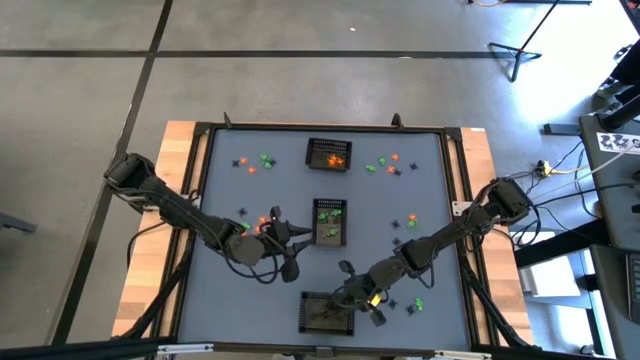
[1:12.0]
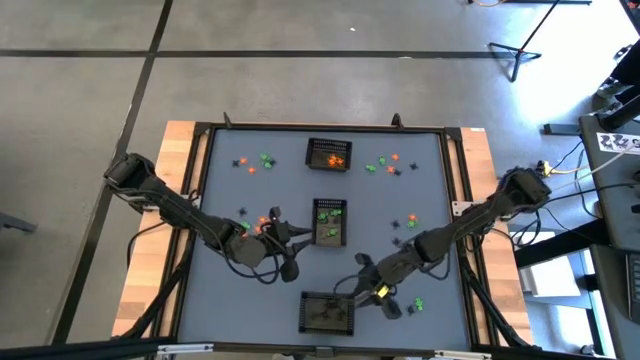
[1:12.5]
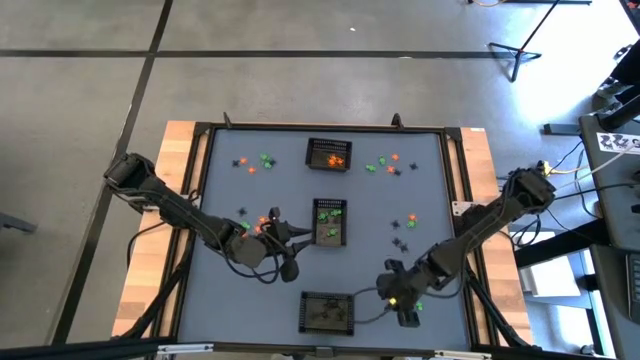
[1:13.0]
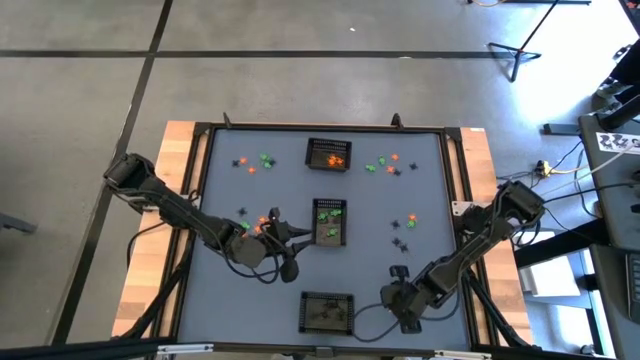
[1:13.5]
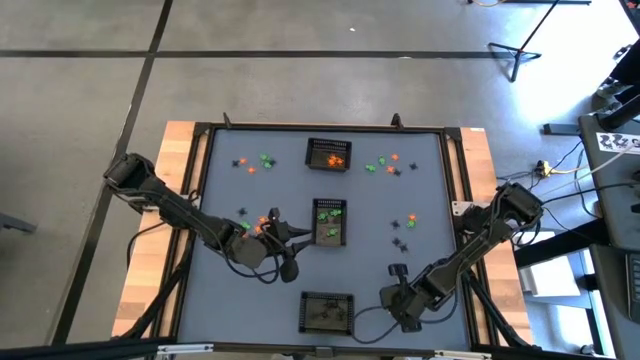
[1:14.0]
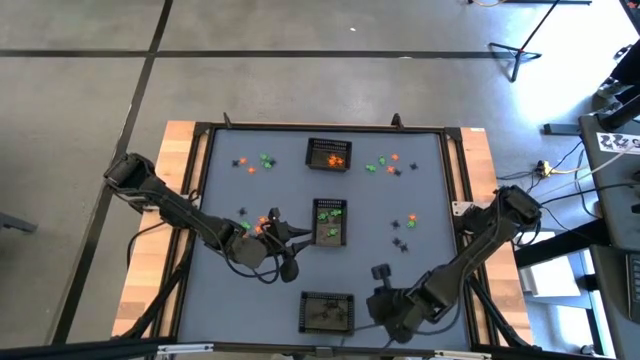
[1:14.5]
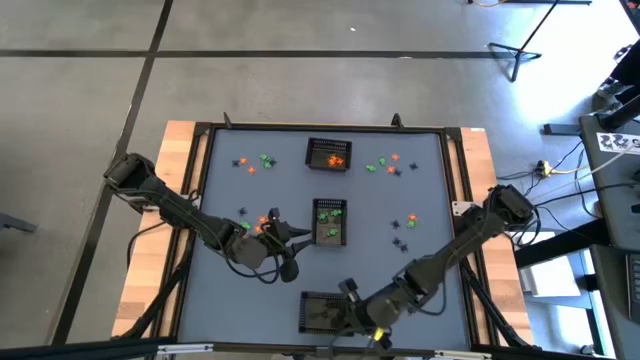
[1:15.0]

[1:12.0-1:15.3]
Task: Sort Halloween decoration
Put the black spider toy into the bottom black bin

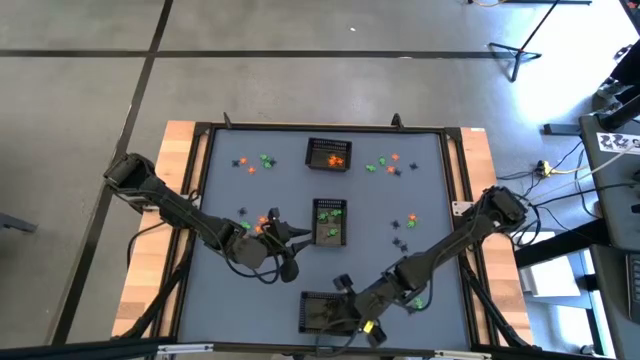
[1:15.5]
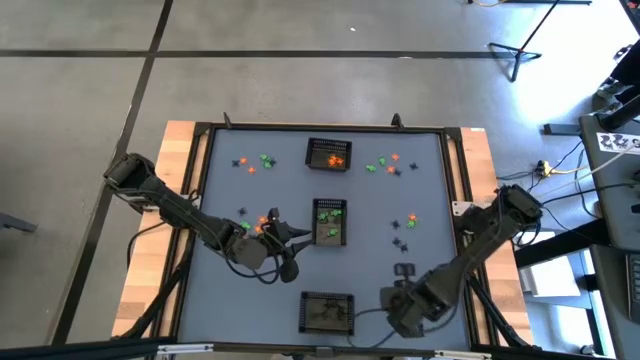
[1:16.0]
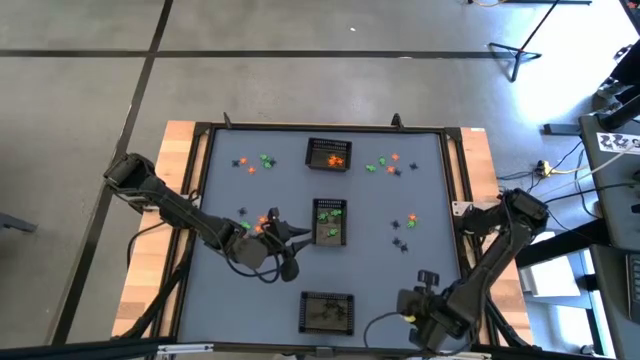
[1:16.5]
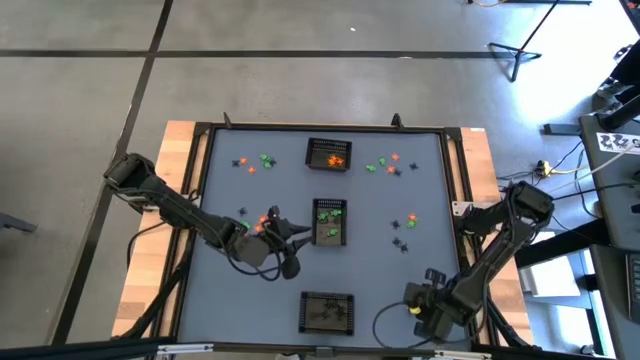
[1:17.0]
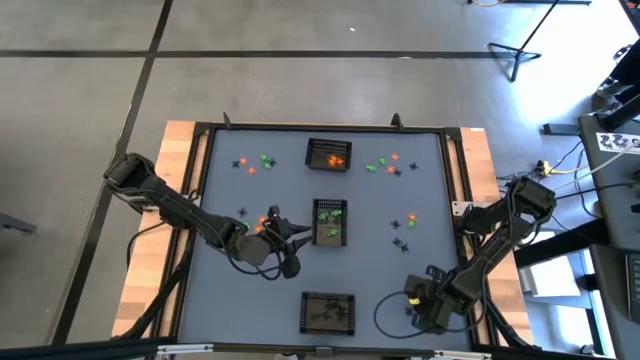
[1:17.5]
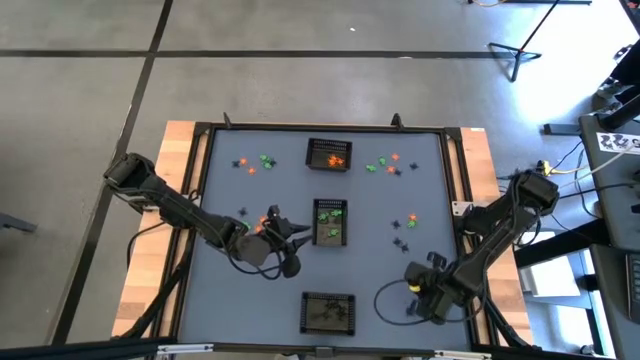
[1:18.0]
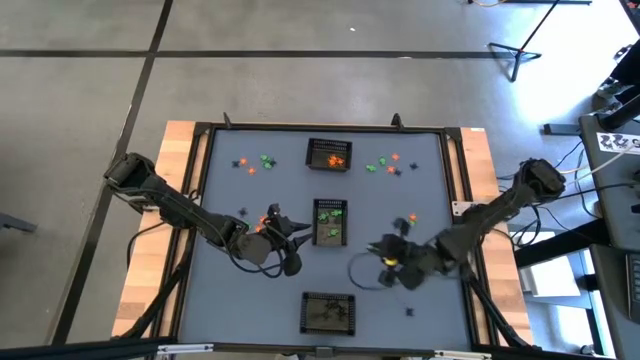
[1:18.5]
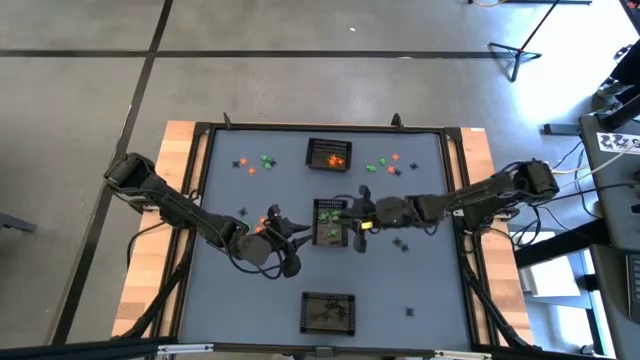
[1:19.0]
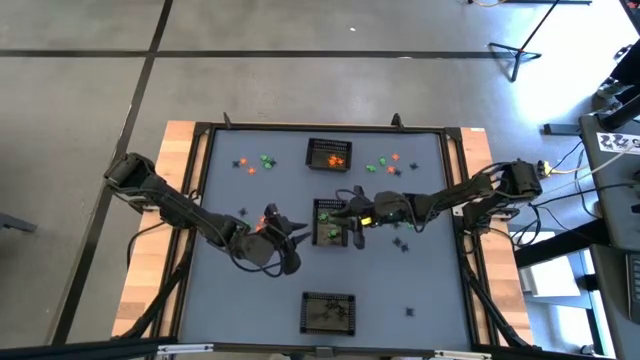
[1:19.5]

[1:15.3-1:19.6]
Put the green skeleton toy into the center black bin

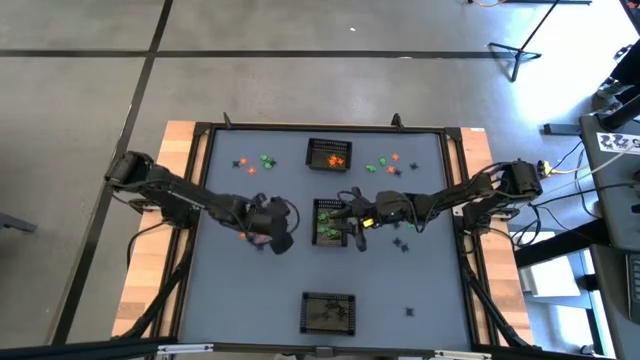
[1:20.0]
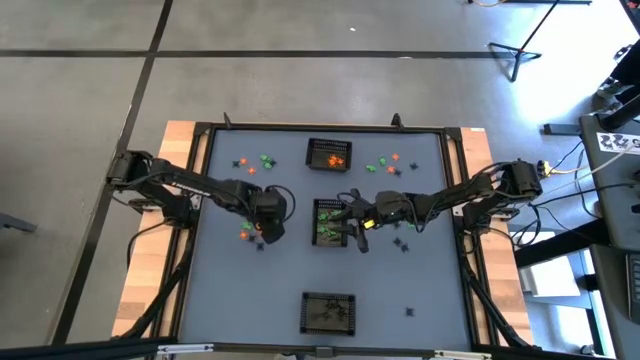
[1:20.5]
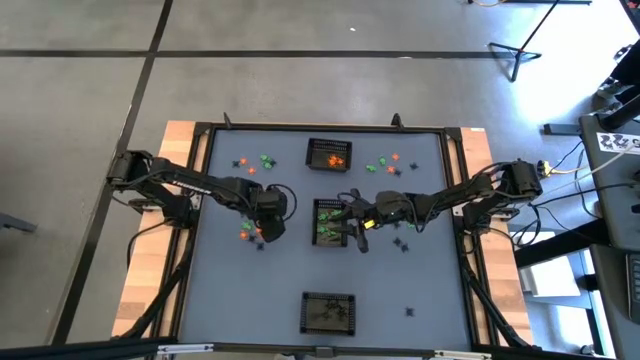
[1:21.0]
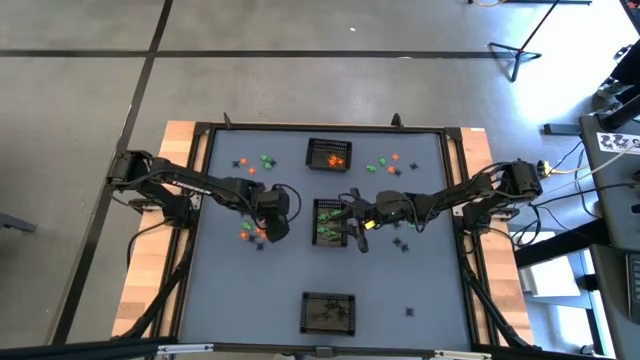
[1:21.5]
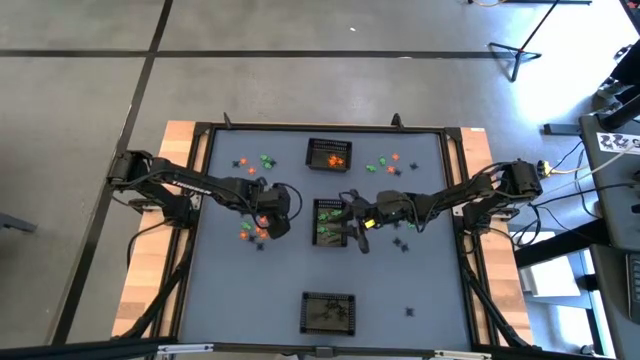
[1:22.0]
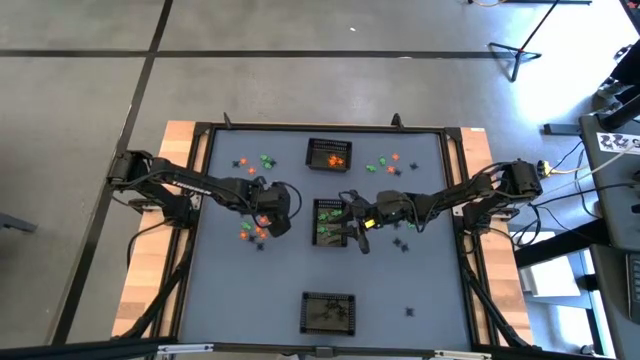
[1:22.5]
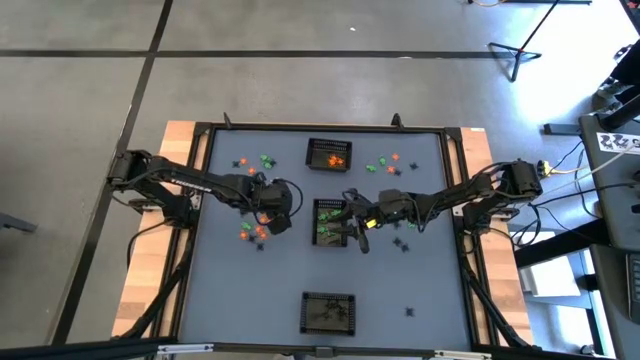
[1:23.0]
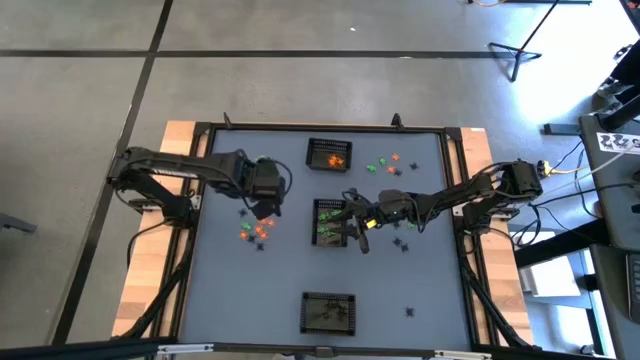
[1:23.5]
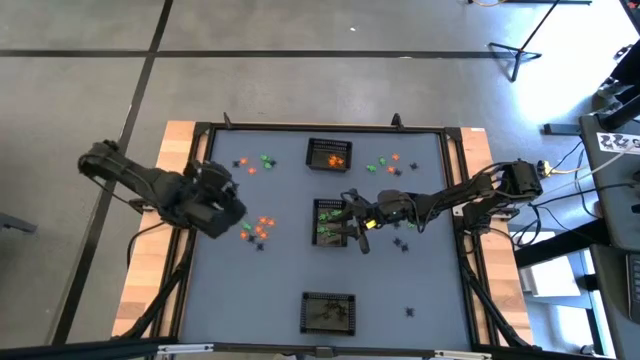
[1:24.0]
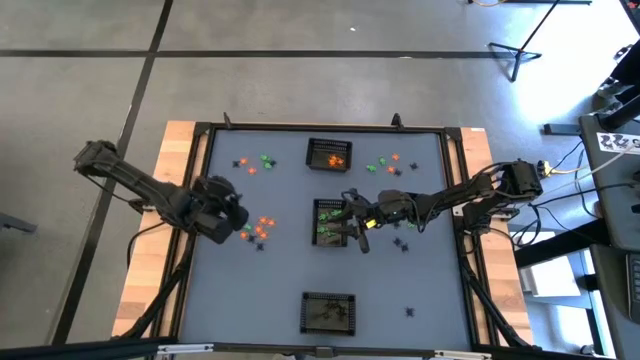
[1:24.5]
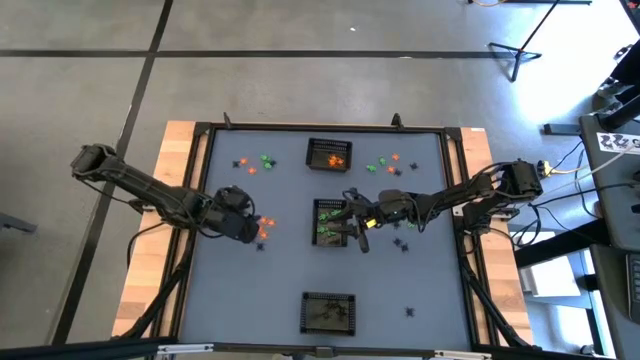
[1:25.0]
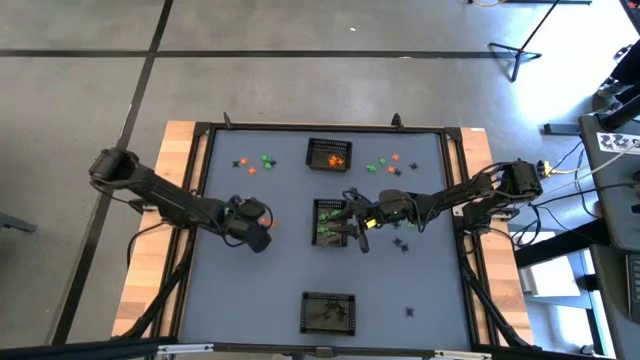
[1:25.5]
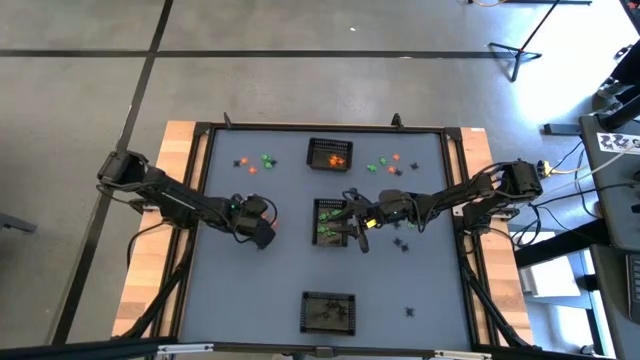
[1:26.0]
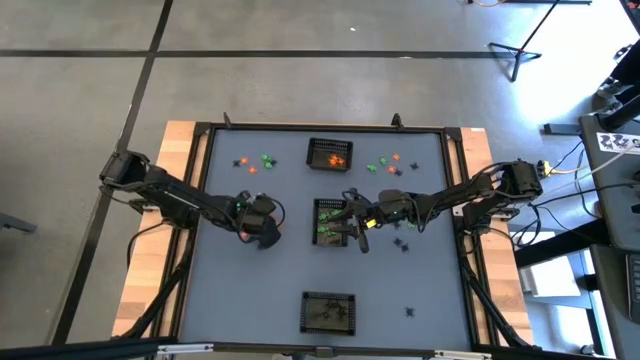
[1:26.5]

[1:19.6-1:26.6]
Put the orange spider toy into the top black bin

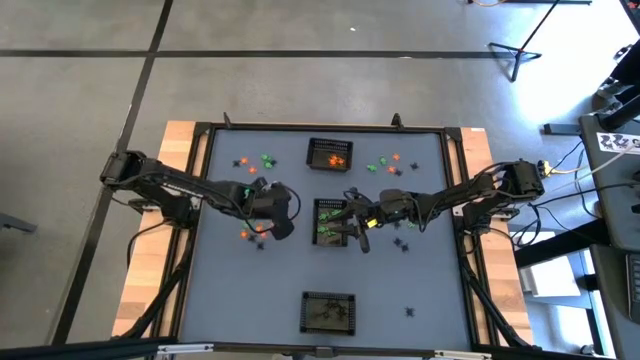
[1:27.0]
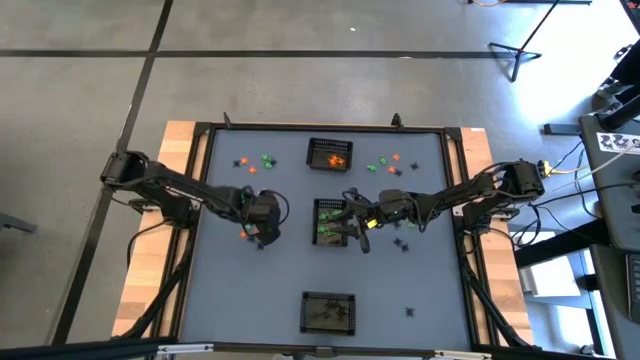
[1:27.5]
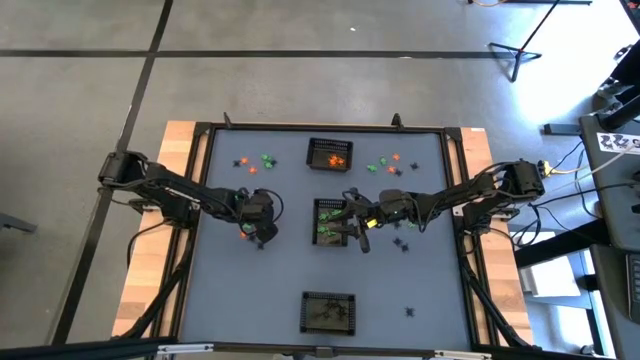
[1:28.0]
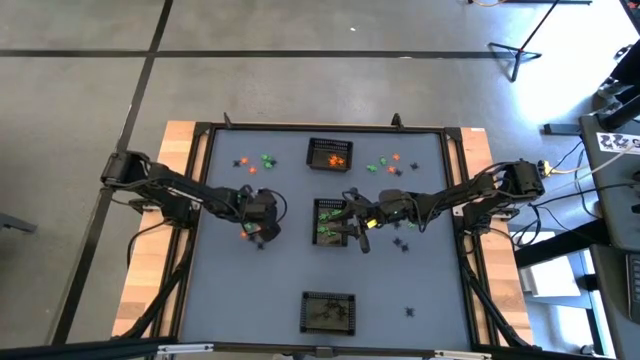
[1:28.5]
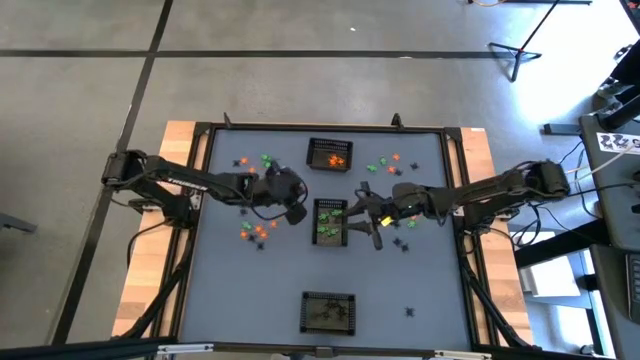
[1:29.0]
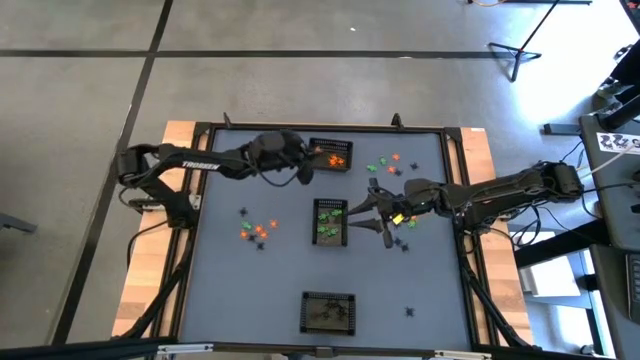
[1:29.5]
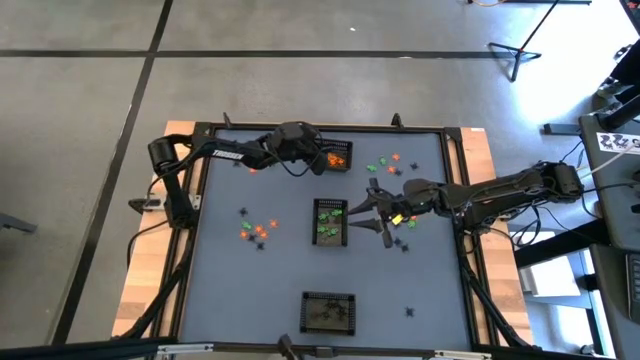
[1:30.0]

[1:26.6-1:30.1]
Put the orange spider toy into the top black bin

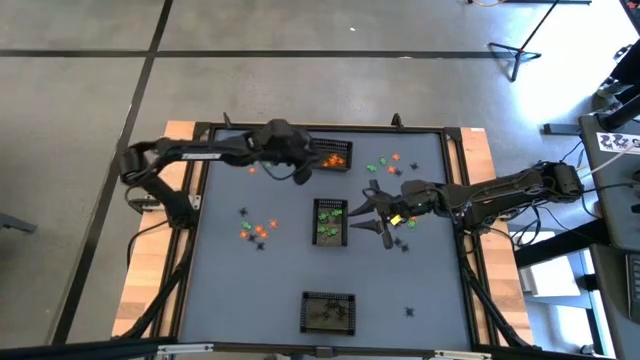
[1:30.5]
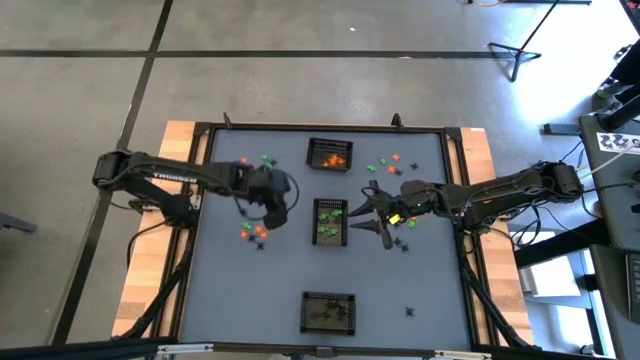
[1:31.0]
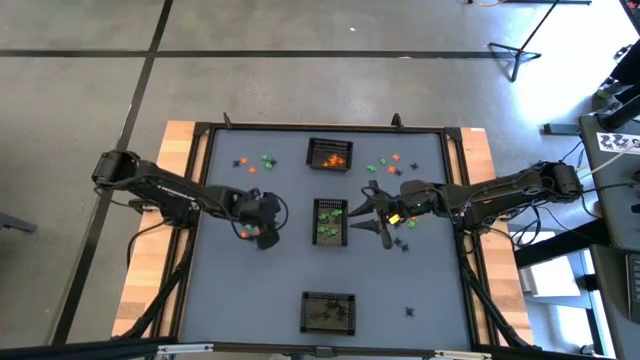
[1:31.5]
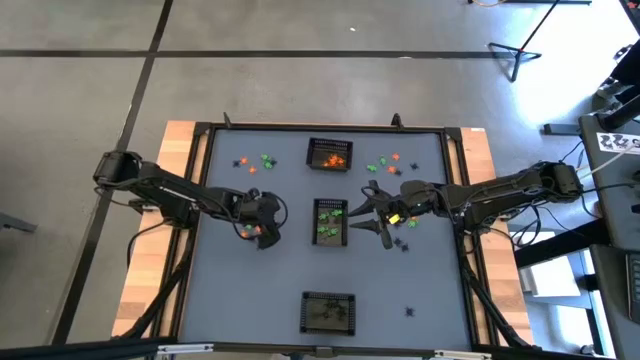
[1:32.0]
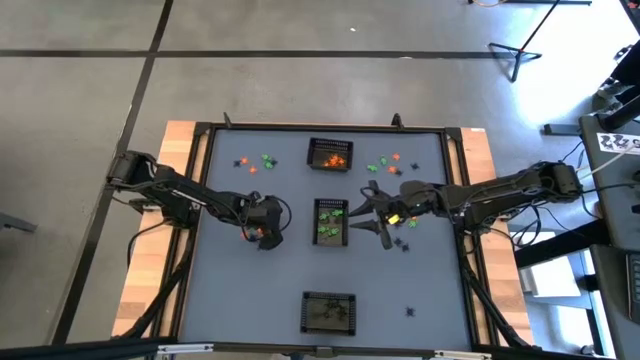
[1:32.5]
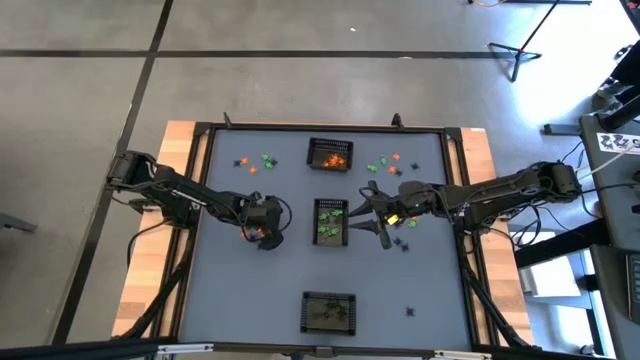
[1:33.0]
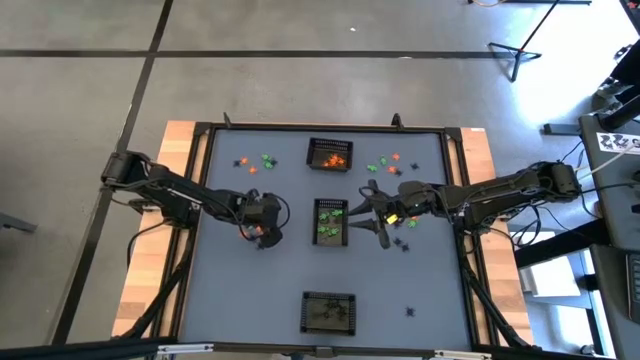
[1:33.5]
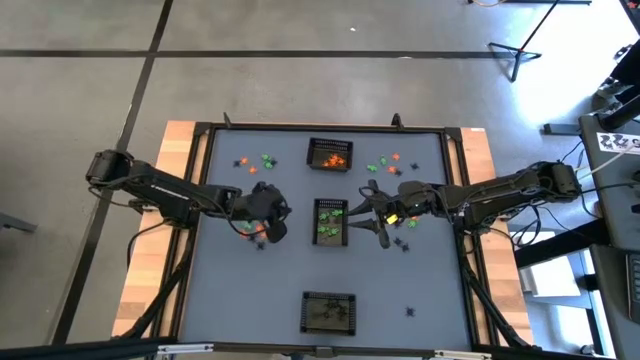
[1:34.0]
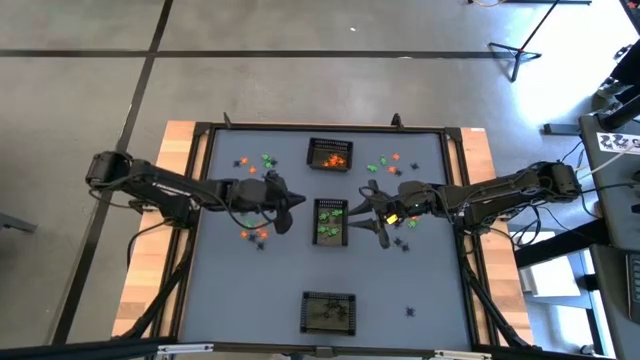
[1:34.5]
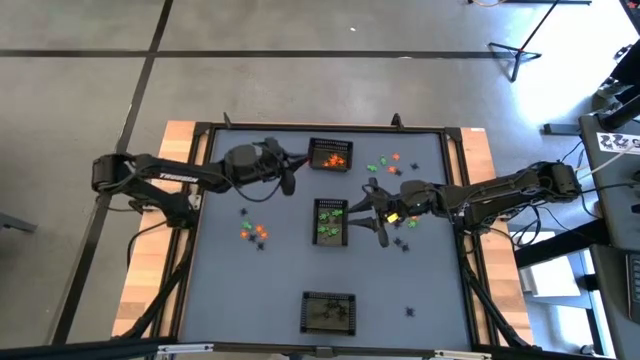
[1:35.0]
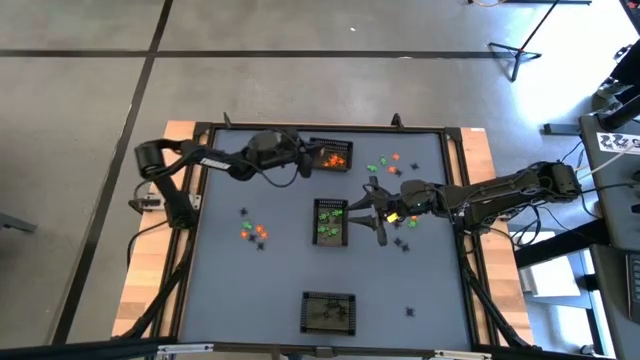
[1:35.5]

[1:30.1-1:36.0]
Put the orange spider toy into the top black bin
